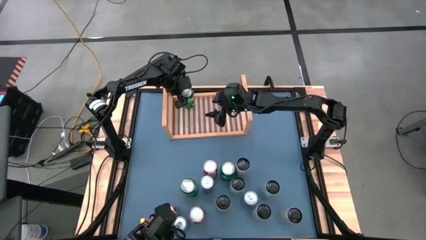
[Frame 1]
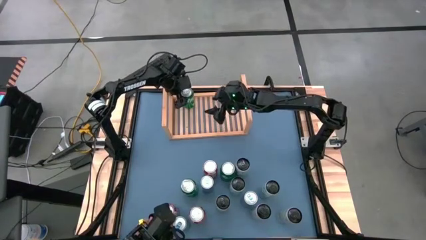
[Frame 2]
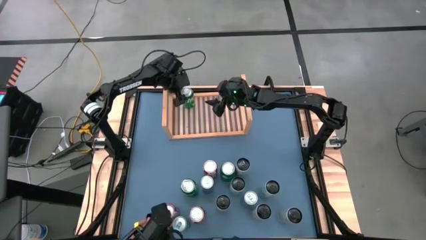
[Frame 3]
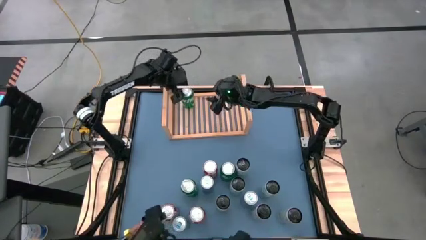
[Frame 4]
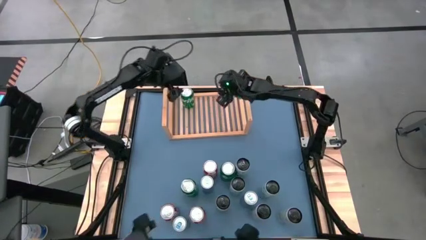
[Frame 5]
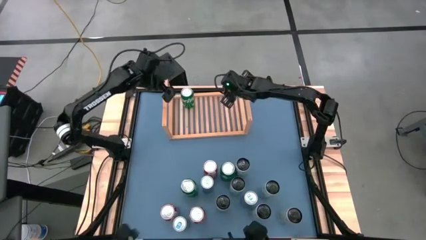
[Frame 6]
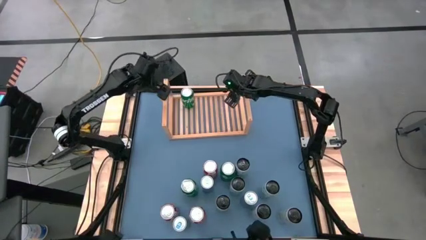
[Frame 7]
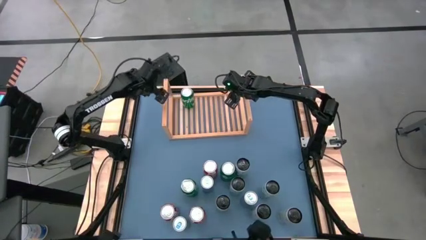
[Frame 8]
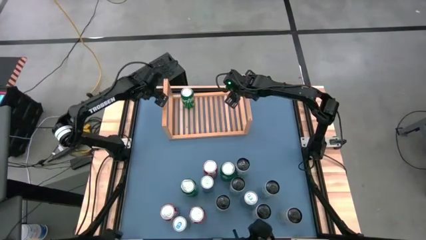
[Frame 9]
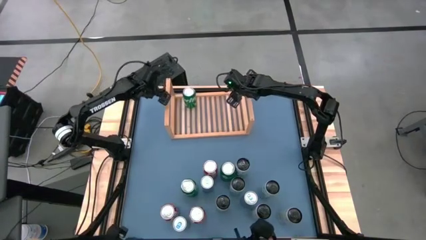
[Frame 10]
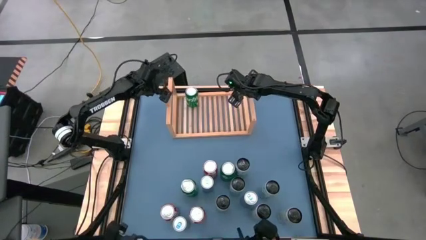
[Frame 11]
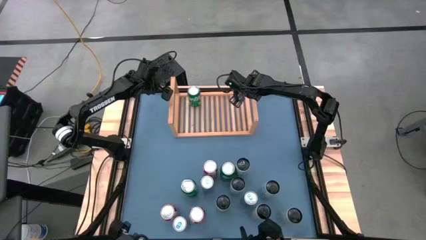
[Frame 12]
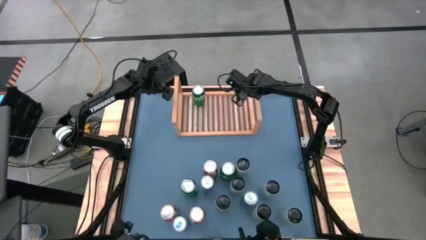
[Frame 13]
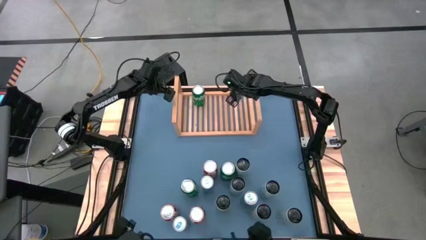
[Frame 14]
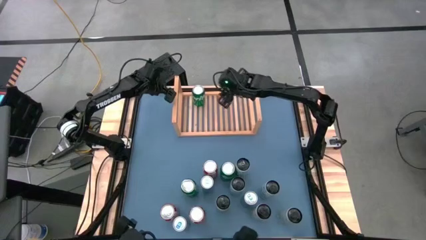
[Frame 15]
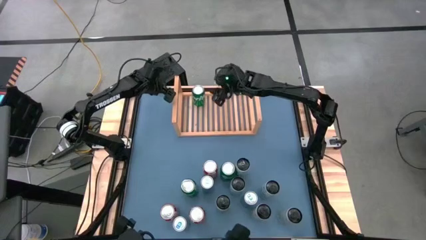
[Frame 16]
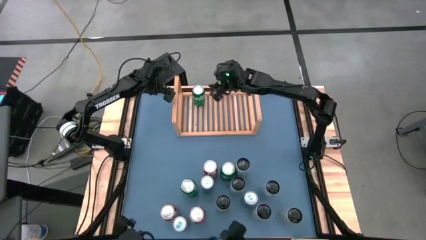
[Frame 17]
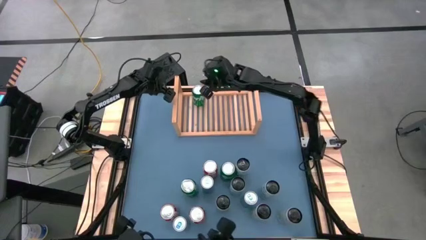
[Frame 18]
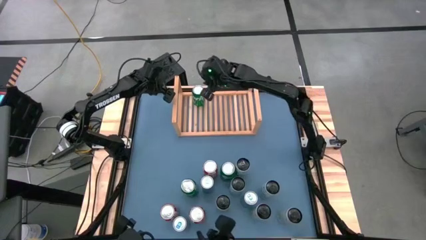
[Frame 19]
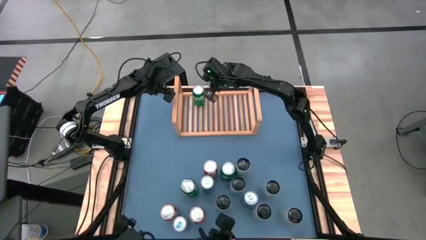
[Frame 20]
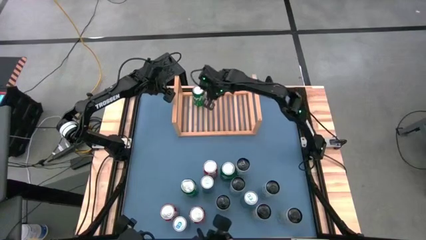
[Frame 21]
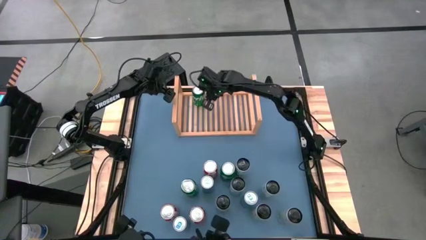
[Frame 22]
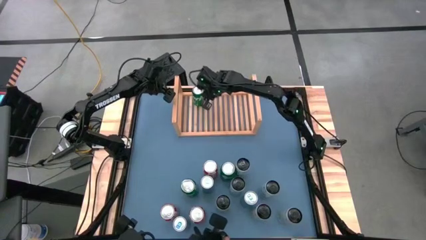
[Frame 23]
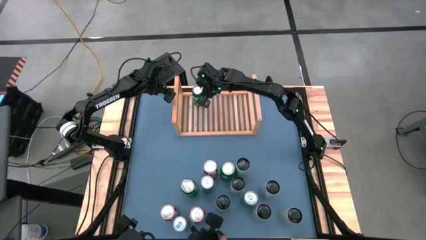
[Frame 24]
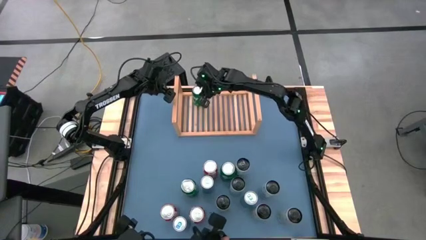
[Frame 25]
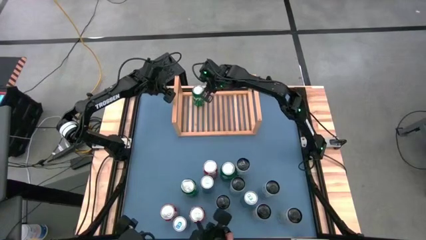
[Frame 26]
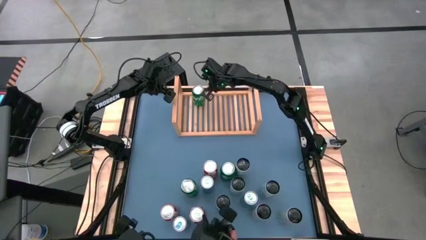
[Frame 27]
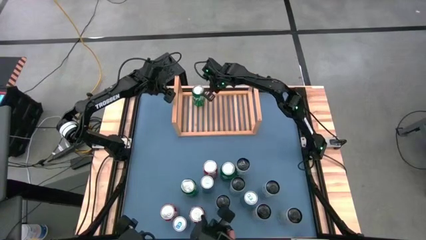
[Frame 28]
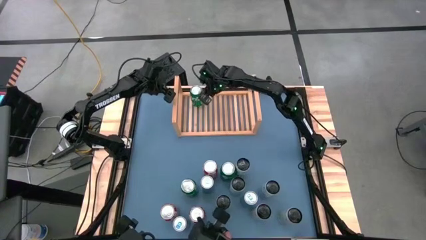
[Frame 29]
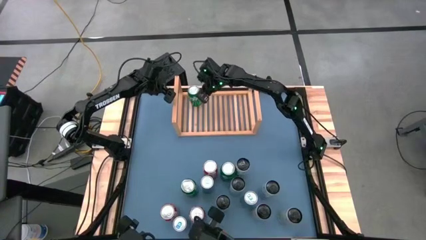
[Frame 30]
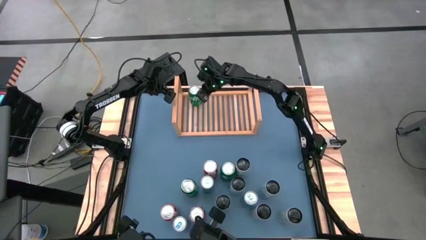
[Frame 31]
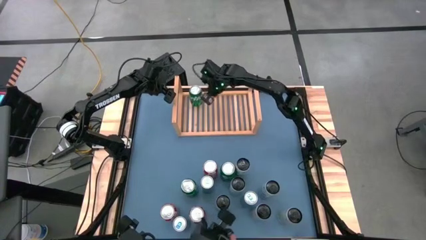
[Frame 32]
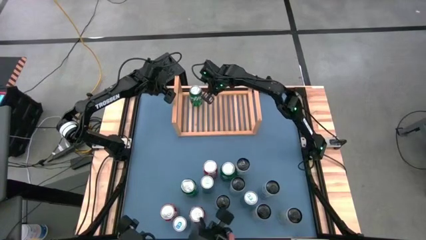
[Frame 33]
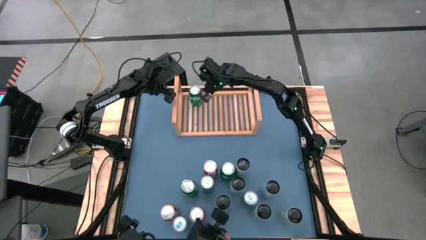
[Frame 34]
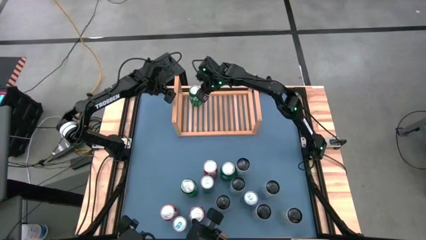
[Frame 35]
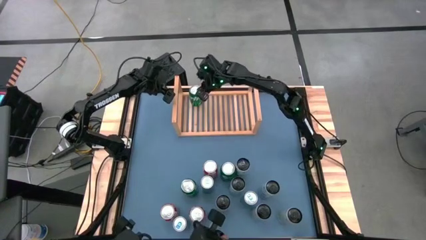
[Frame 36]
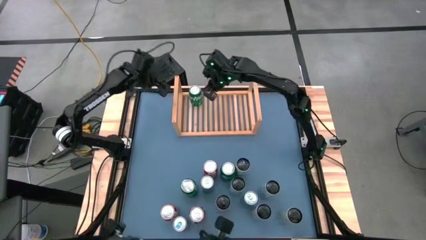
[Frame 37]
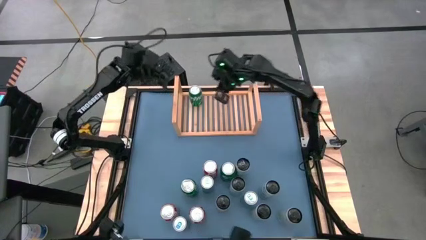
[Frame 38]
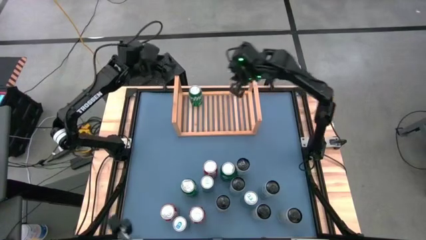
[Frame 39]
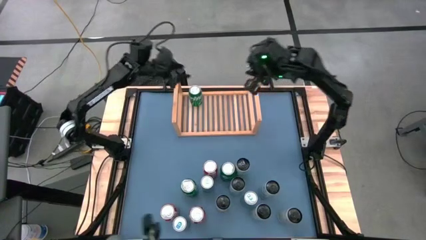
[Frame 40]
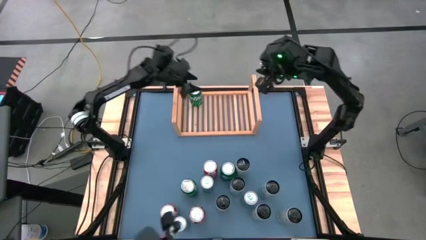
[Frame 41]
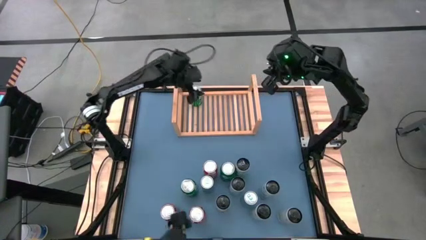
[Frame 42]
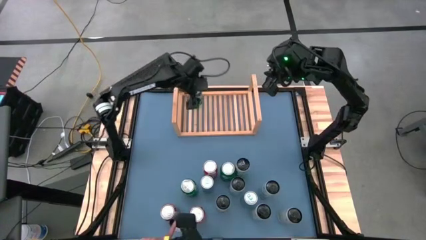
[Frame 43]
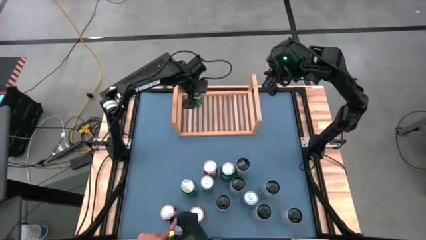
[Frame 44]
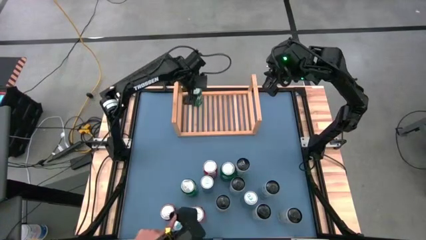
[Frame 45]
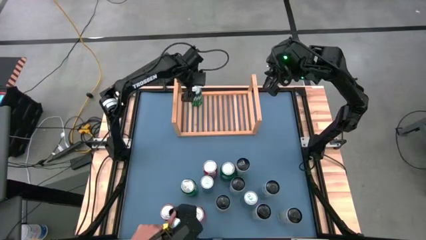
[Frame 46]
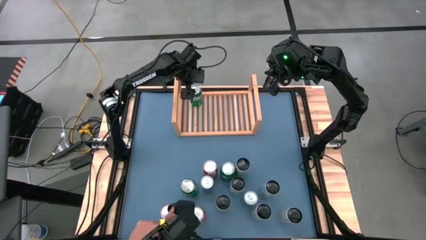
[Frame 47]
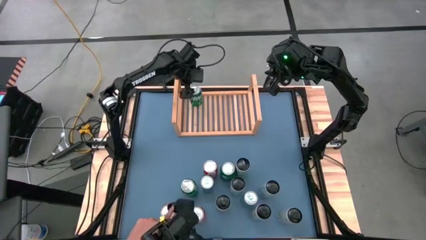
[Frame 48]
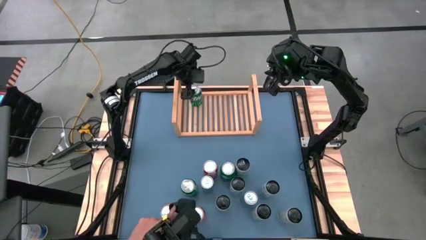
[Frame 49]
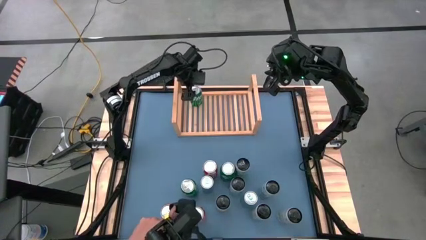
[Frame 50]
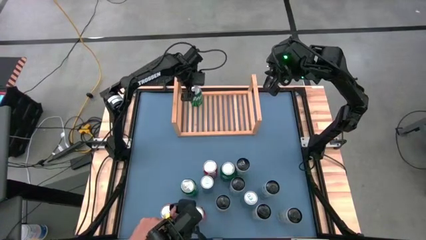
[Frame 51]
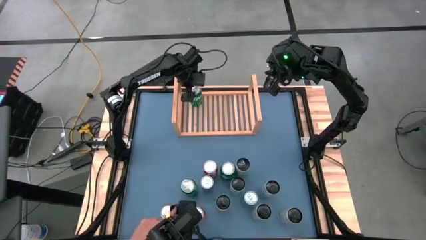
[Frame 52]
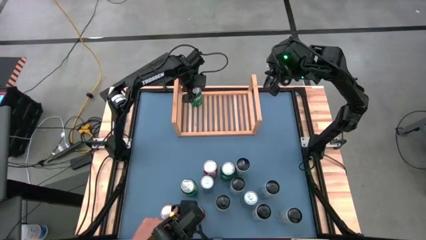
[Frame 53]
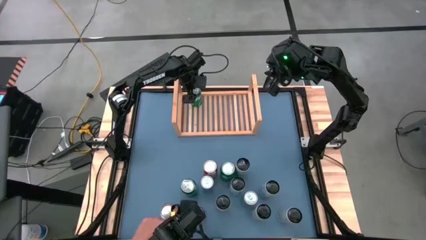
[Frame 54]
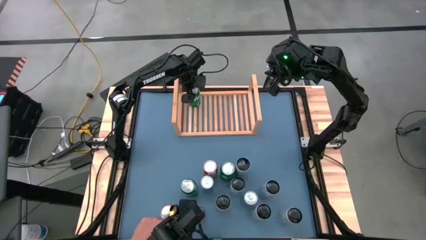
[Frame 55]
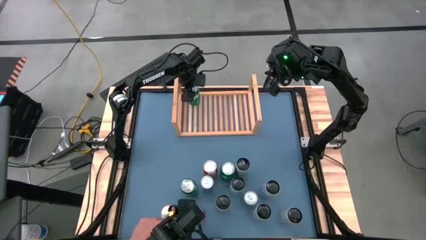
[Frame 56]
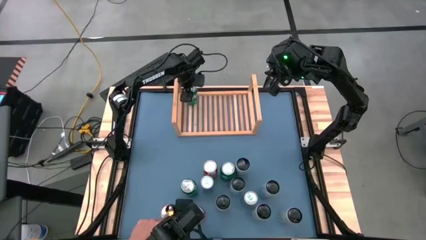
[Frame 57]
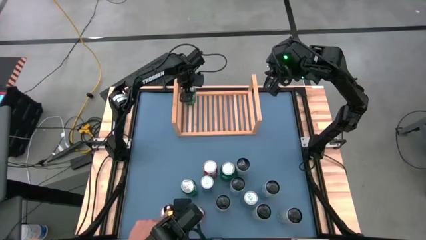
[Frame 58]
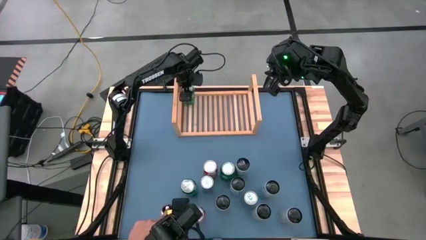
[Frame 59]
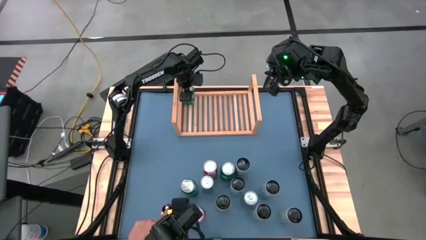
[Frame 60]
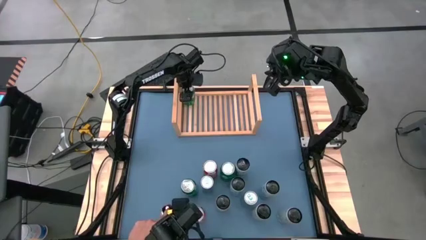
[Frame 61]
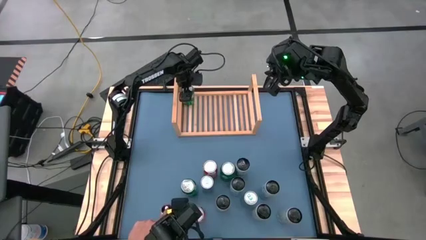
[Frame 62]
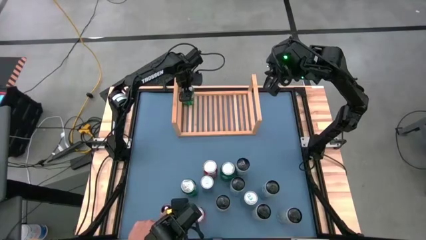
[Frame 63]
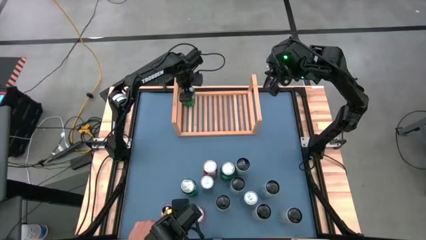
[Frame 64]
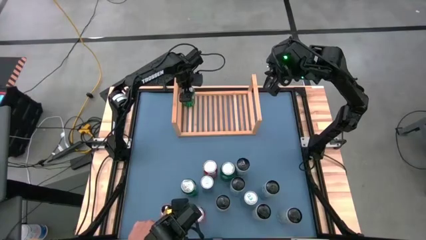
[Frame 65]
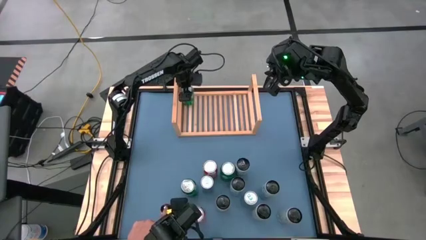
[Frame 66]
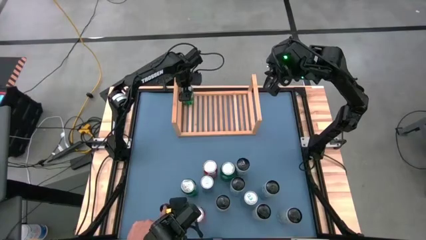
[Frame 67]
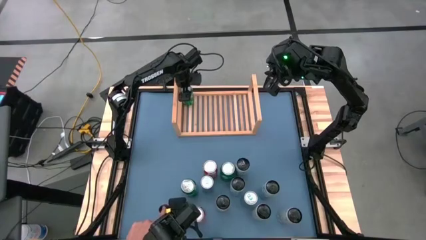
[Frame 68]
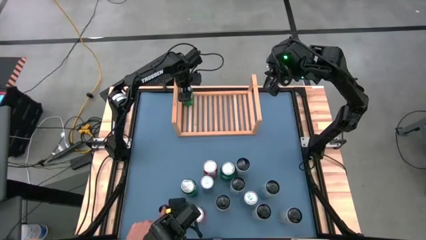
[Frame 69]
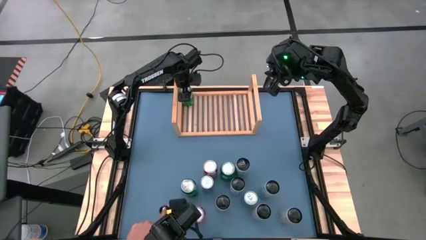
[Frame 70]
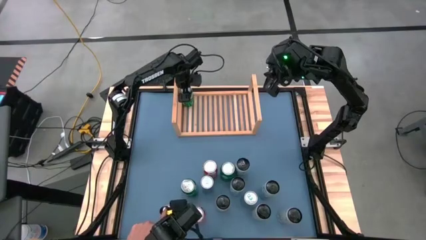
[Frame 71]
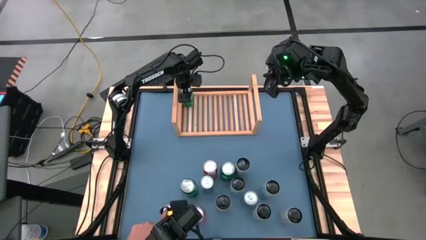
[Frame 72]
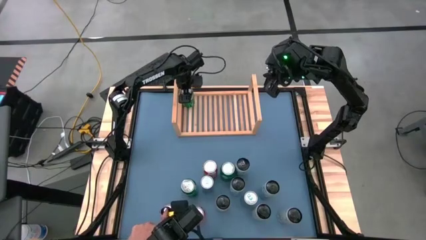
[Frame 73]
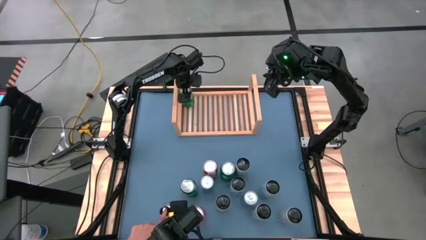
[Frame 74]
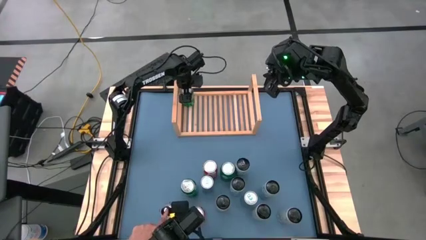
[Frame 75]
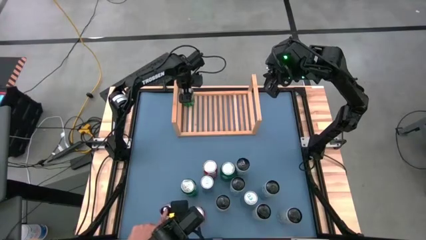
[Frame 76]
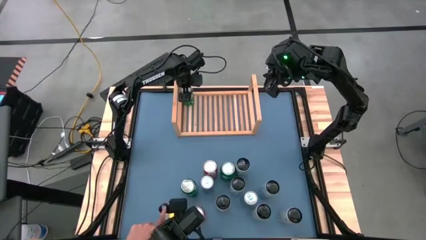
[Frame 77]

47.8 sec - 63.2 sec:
Task: Place canned beverage on shelf
Adjust the green soda can on the shelf
